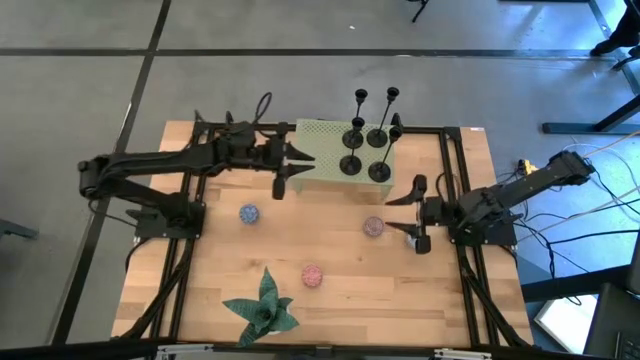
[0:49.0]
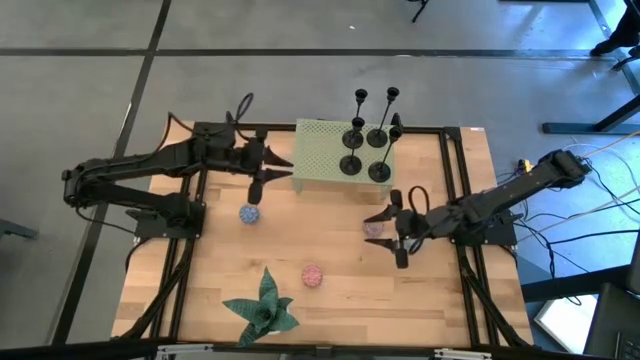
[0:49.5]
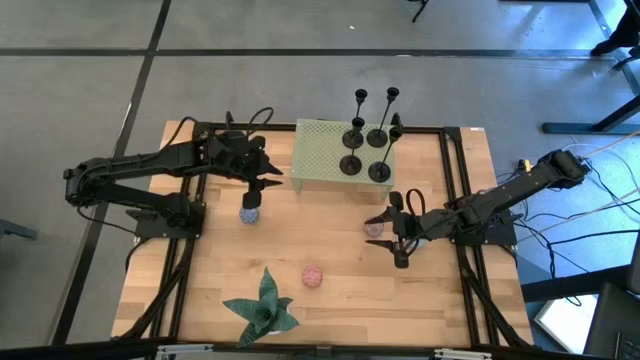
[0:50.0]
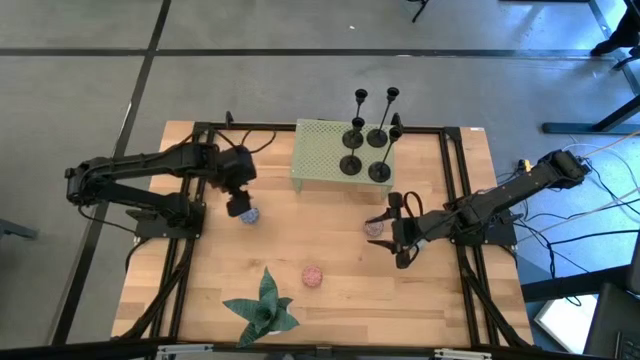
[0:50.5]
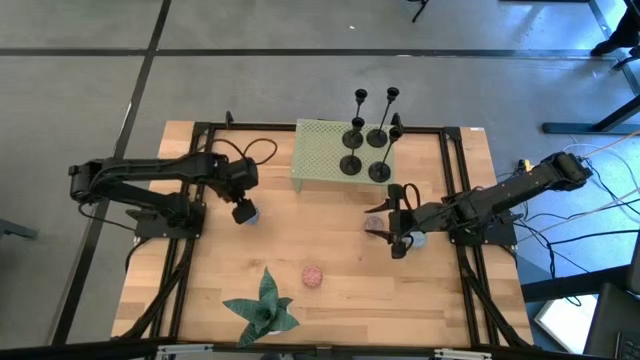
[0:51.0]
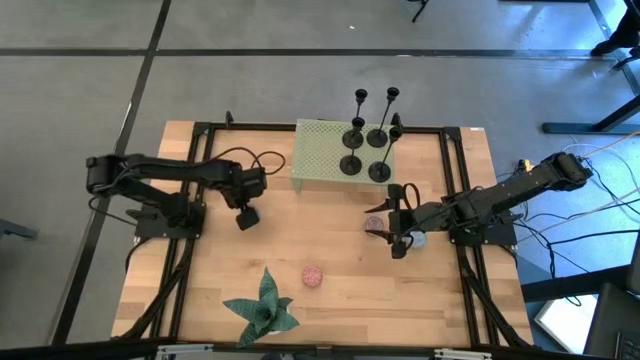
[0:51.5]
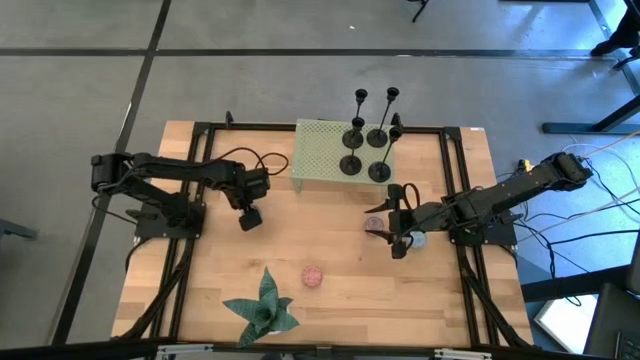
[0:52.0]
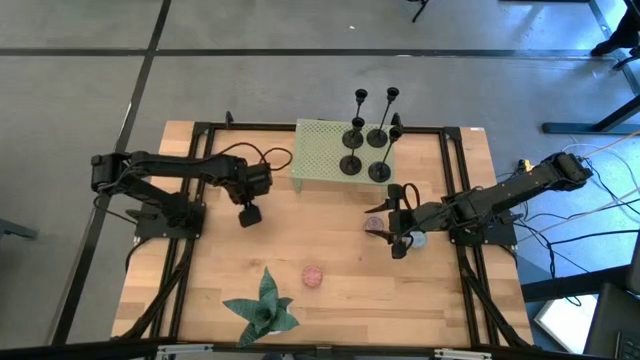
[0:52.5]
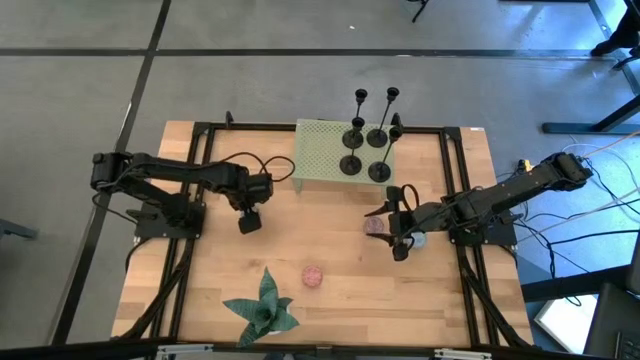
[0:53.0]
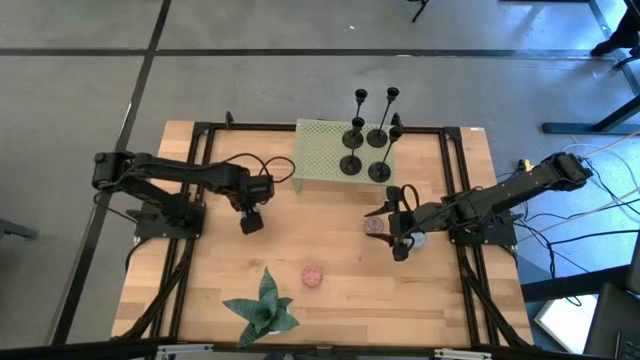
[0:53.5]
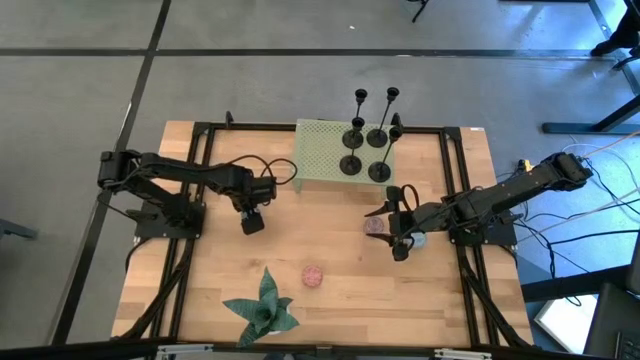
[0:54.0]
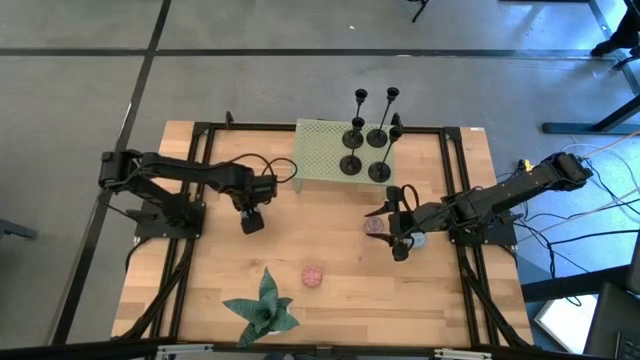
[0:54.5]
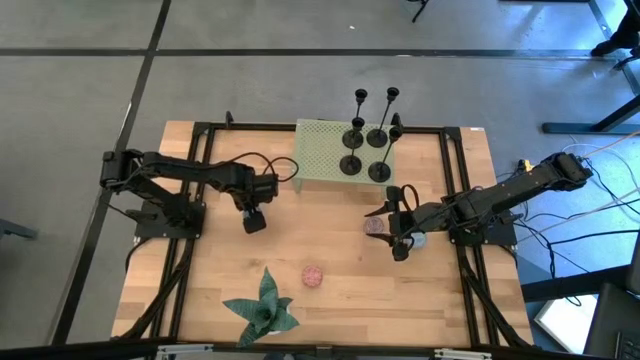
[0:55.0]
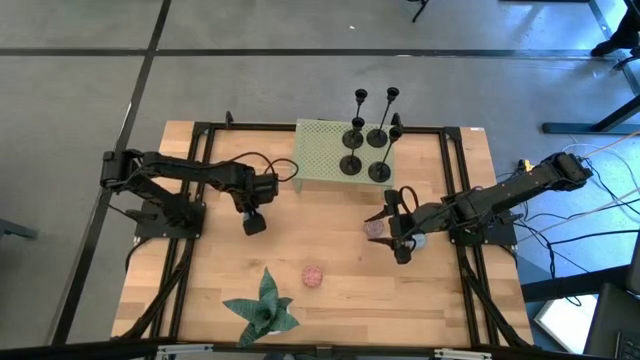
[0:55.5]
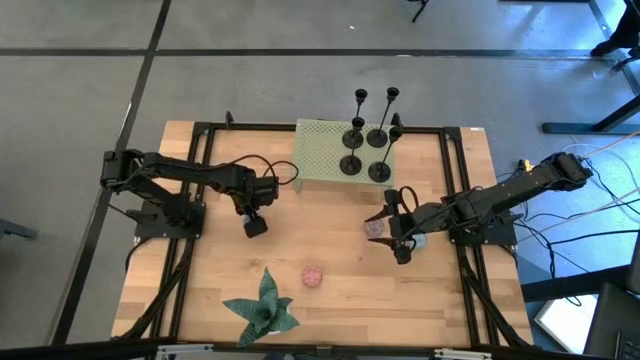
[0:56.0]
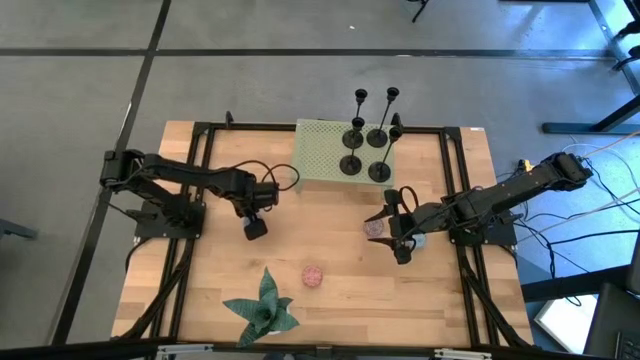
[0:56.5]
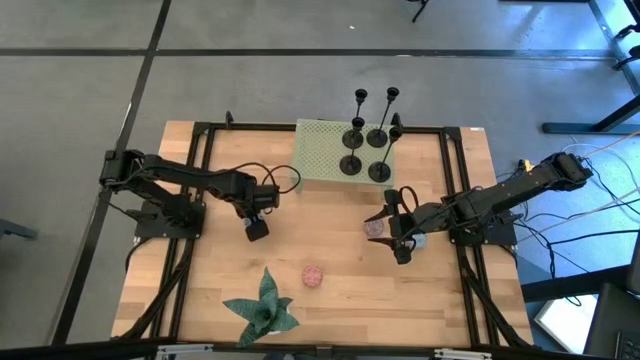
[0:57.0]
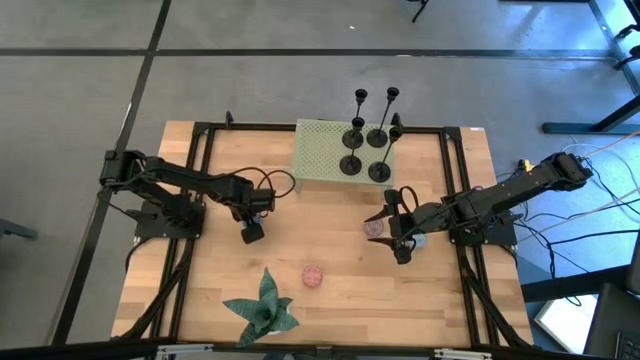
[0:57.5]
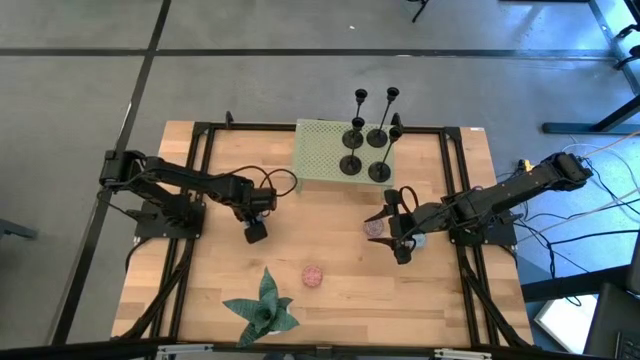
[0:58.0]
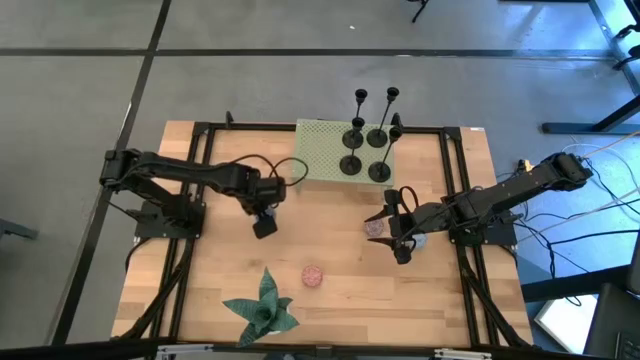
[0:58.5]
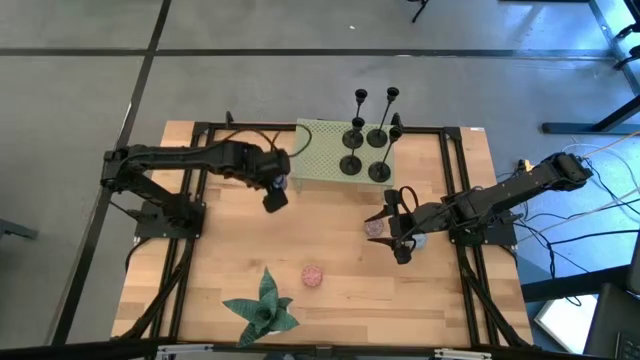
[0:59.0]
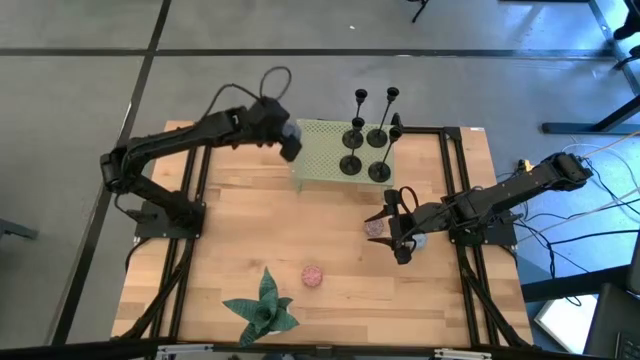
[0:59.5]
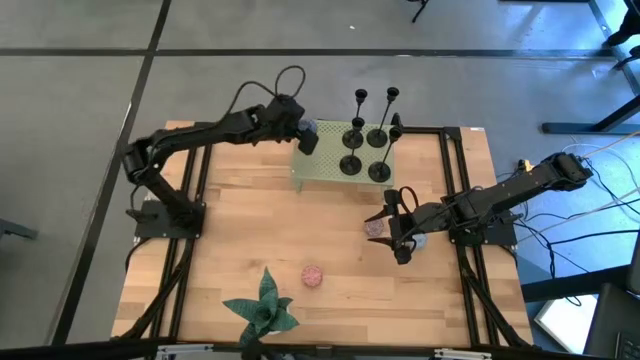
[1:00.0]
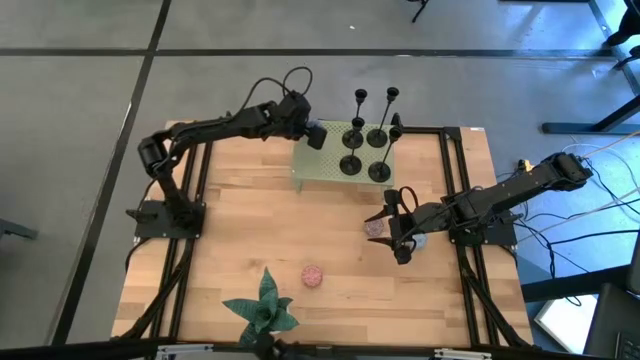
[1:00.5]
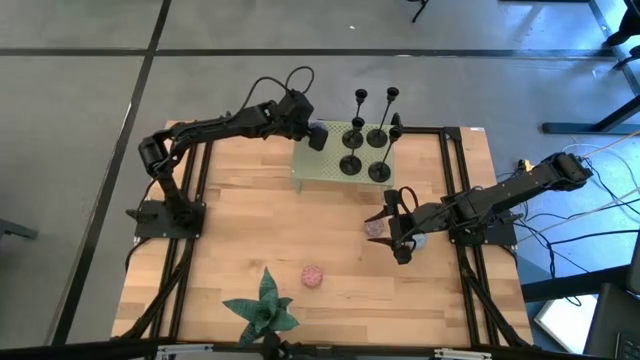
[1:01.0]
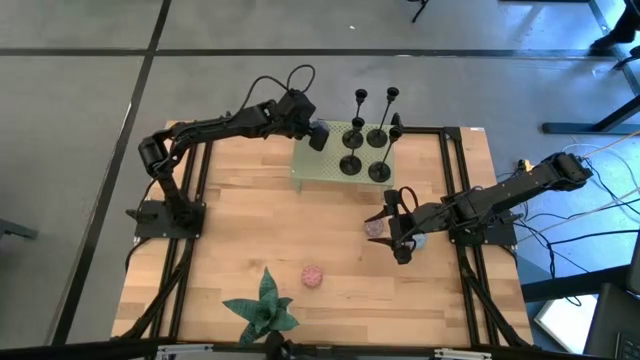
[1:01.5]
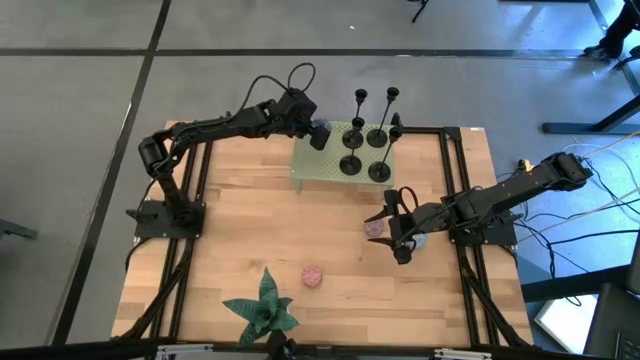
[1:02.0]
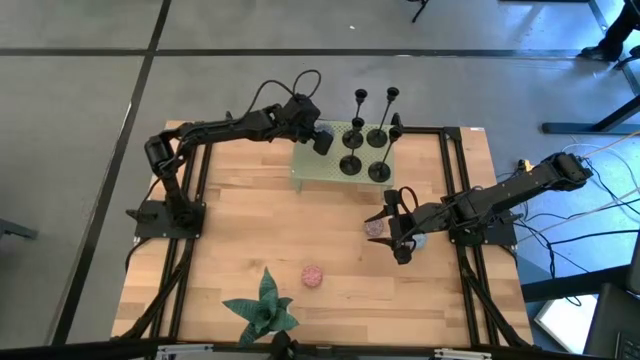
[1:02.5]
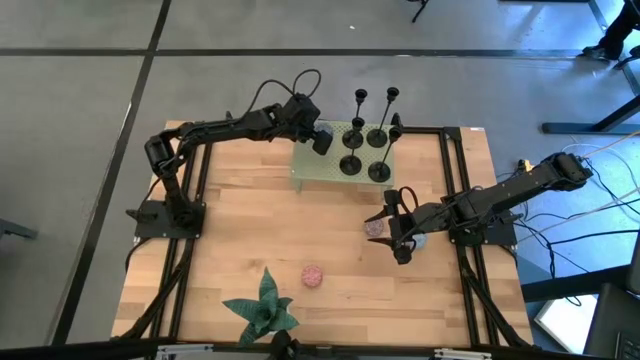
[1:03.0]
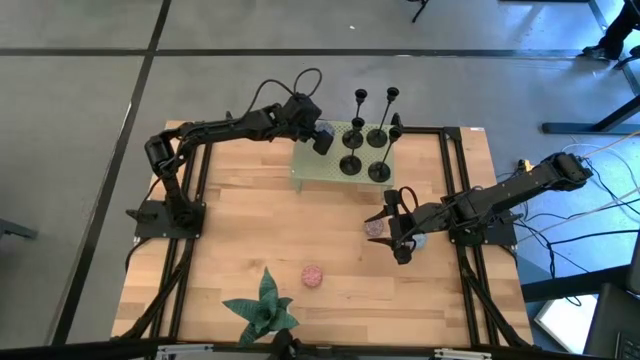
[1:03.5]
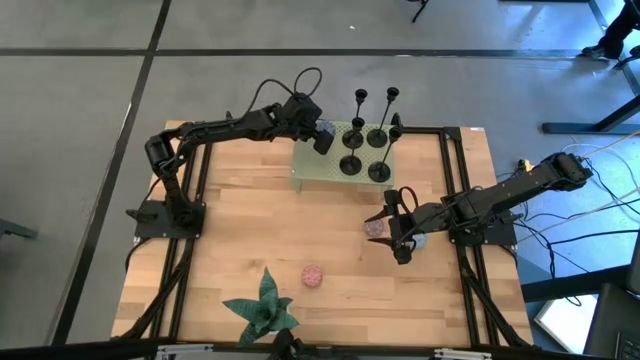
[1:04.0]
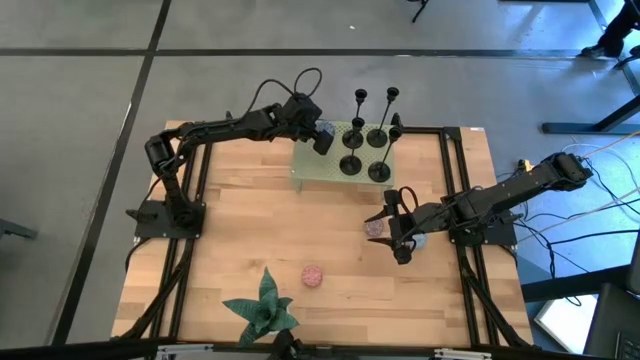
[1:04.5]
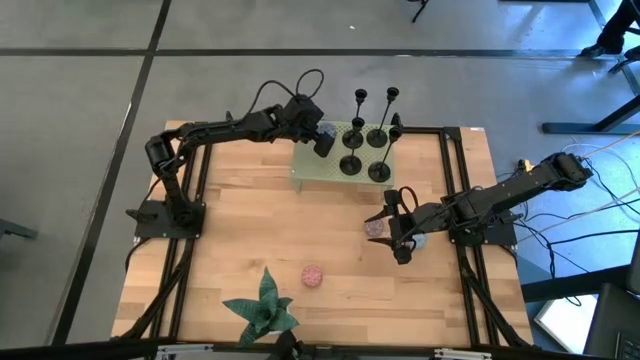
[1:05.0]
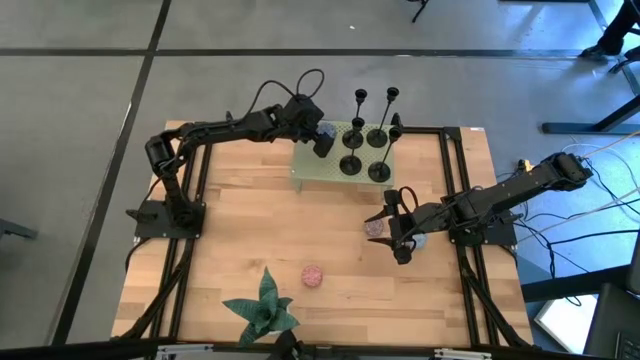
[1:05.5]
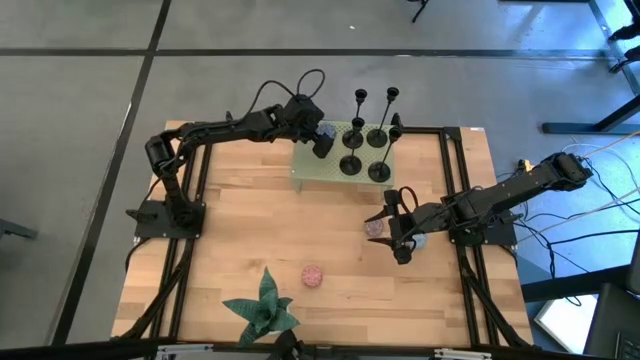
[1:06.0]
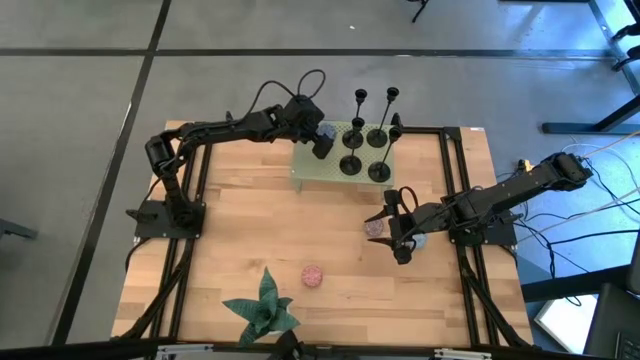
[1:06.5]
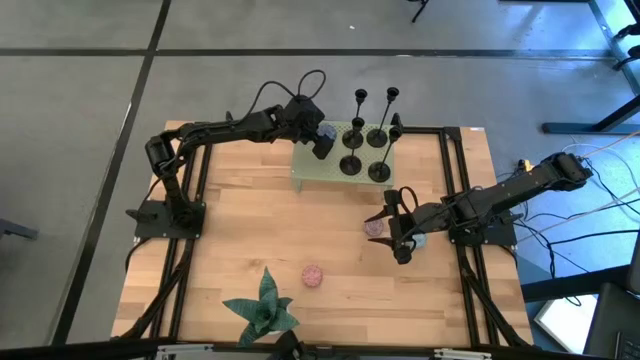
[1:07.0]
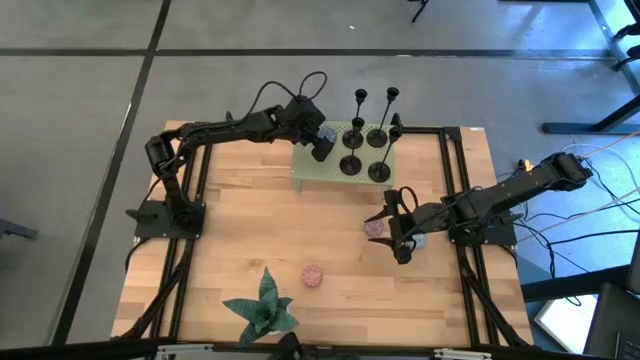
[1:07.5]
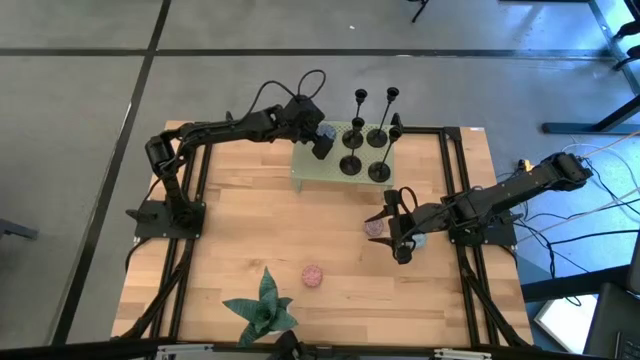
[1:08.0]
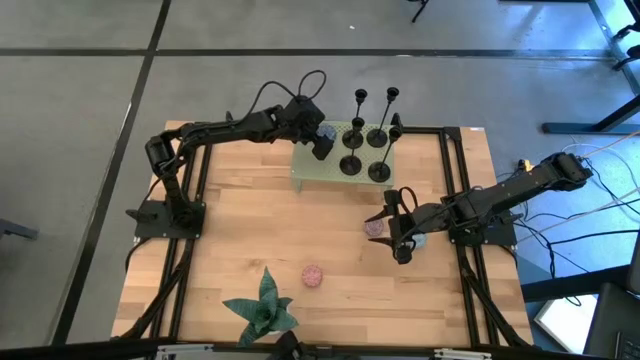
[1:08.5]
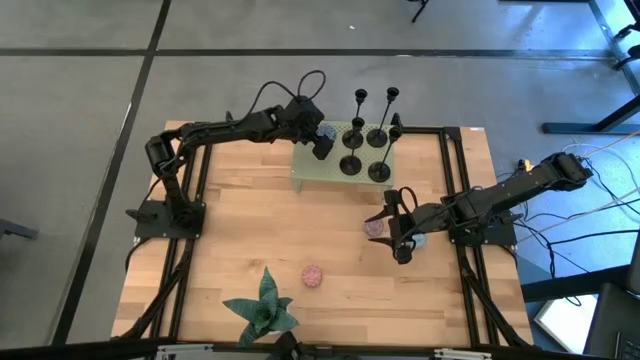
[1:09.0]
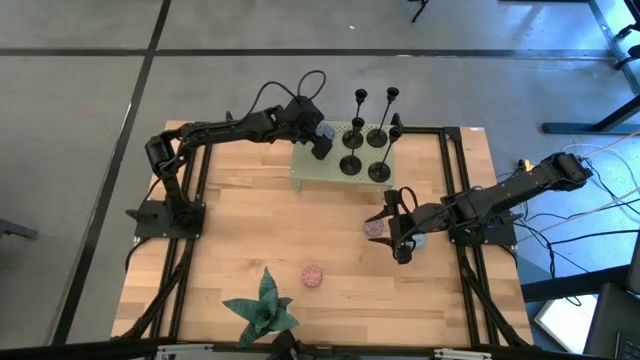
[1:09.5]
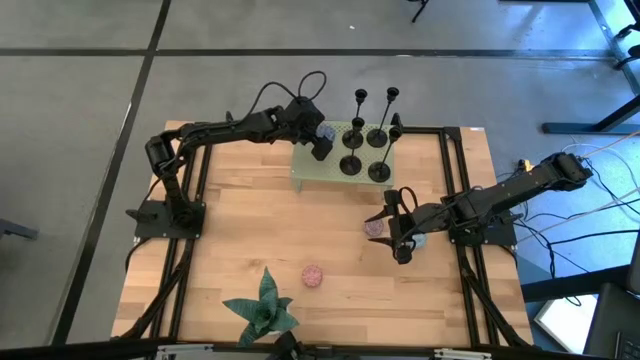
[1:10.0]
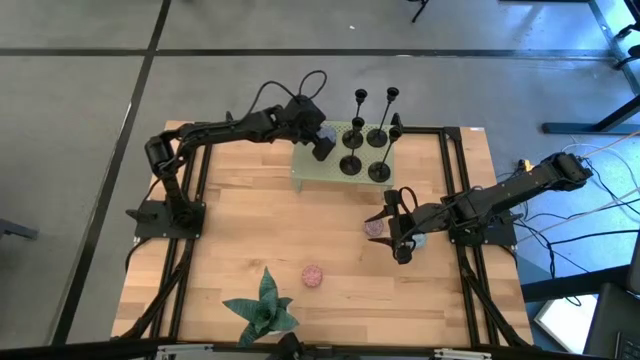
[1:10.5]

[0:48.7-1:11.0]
Task: Pick & Place candle stick holders
Put the blue scented candle on the shelf
